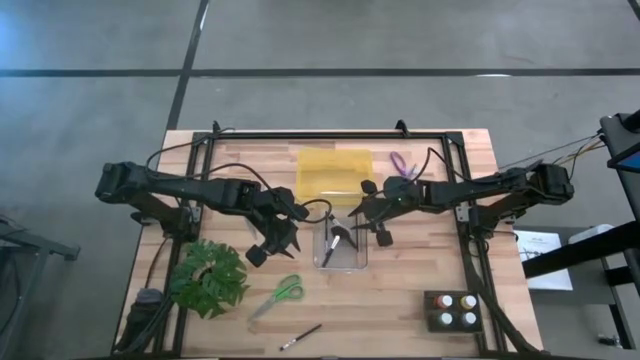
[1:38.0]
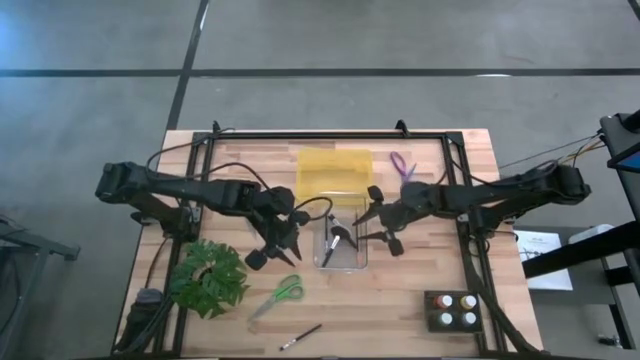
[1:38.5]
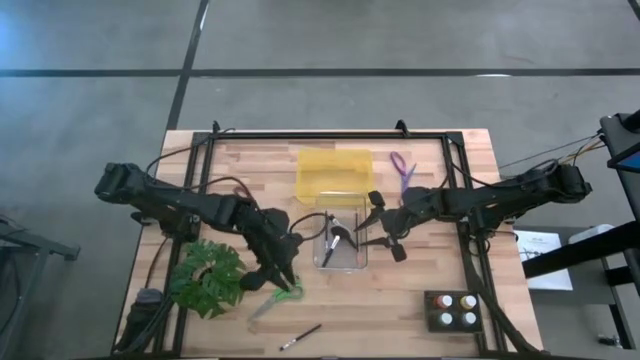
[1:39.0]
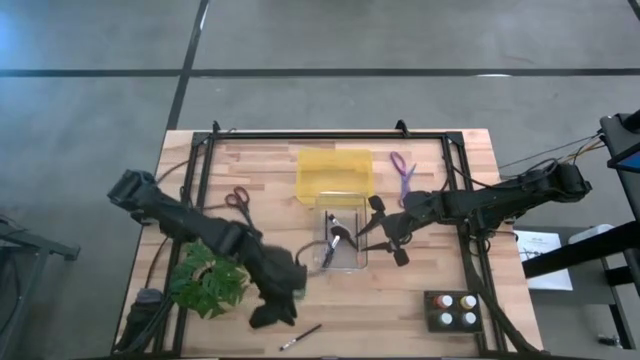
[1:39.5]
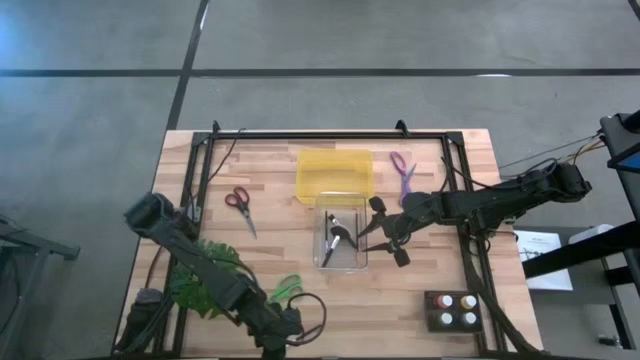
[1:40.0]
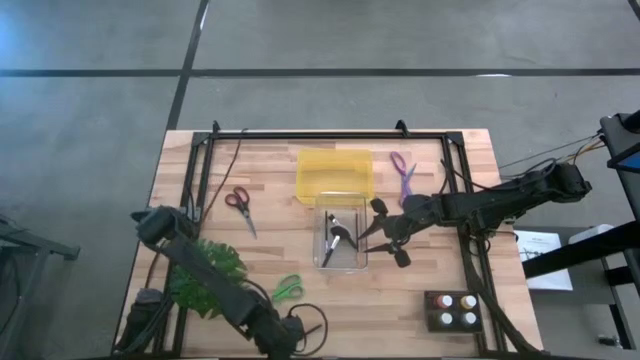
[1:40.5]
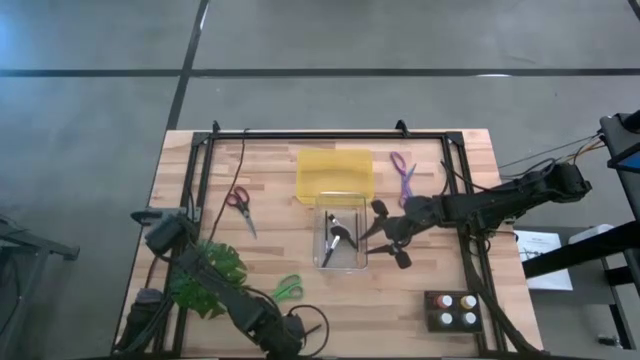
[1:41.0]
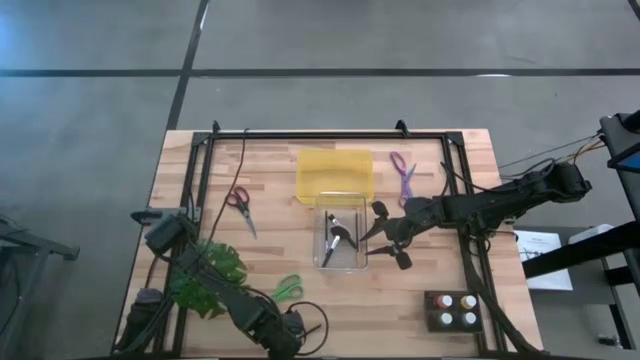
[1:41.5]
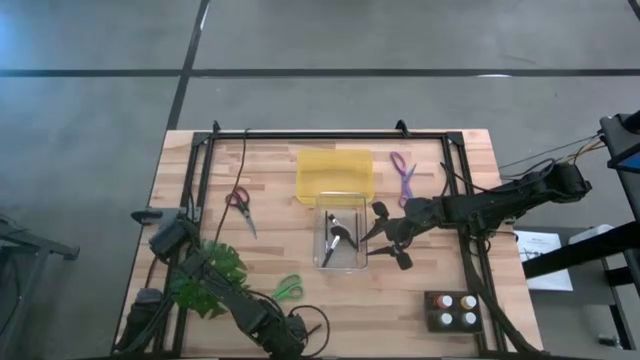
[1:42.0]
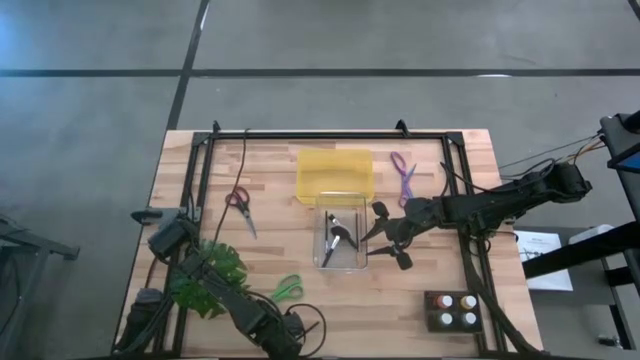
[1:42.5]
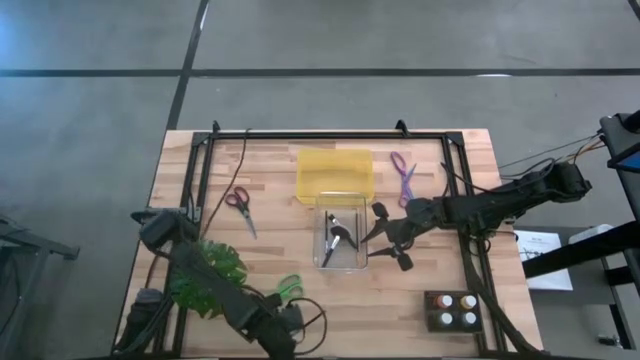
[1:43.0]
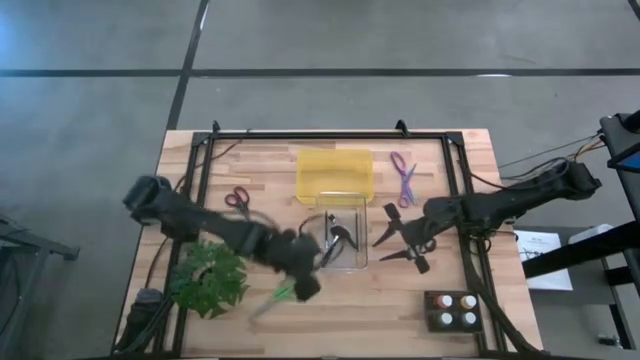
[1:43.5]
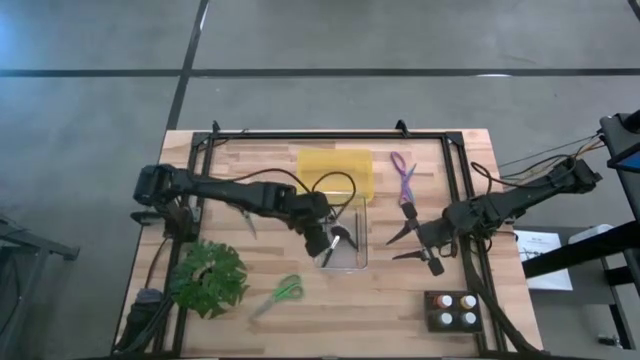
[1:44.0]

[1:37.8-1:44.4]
Task: Pick & Place Paint Supplies
Put the silver eyeshadow brush into the transparent bin

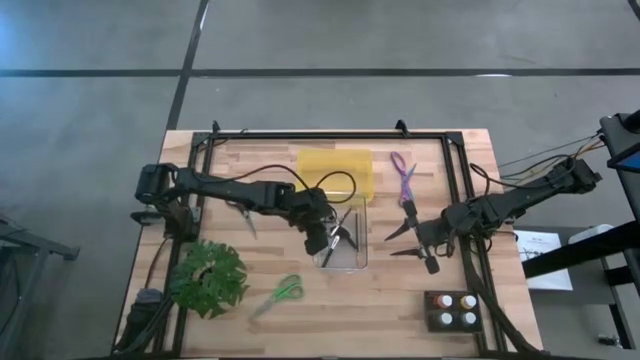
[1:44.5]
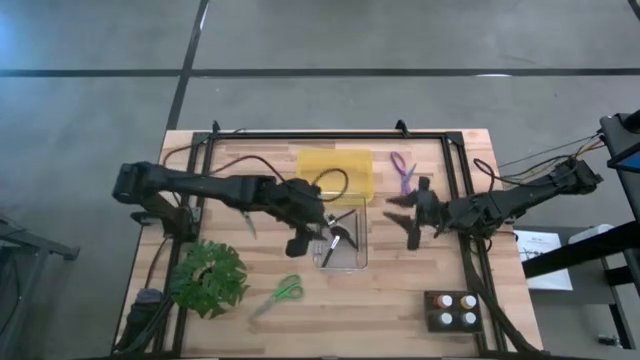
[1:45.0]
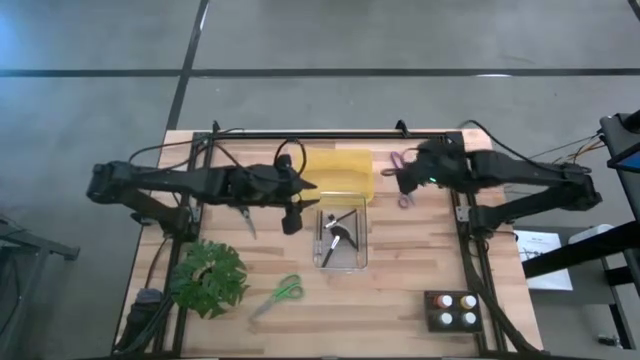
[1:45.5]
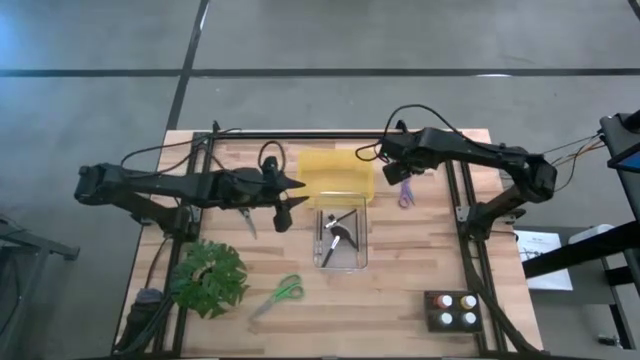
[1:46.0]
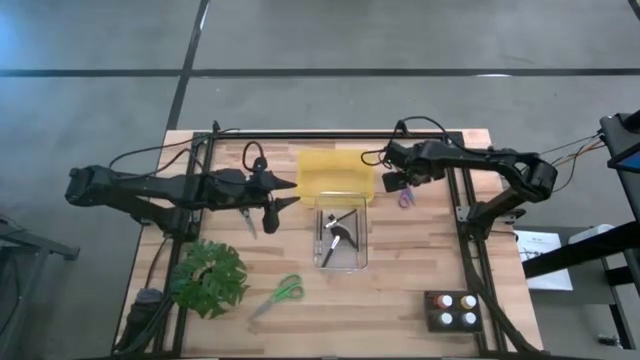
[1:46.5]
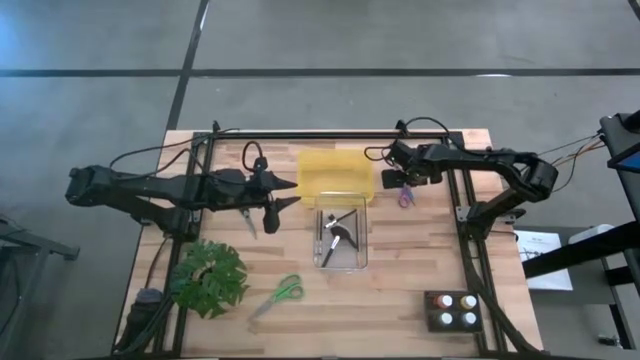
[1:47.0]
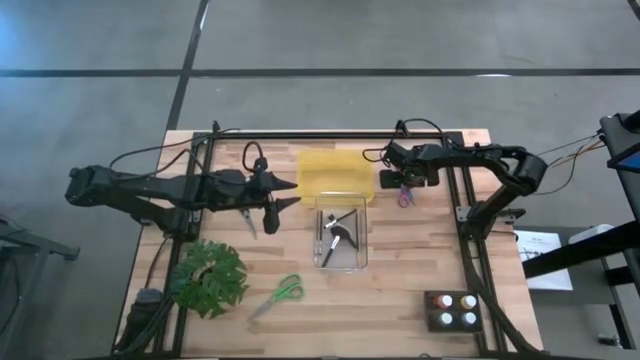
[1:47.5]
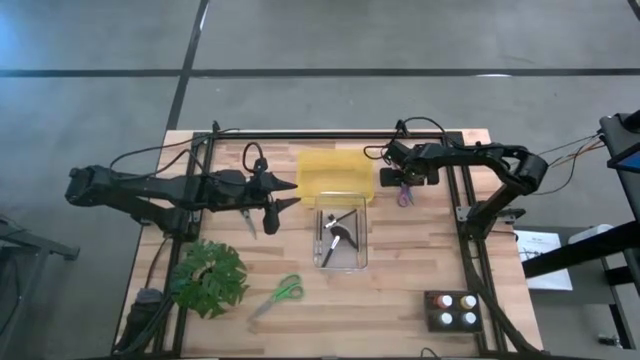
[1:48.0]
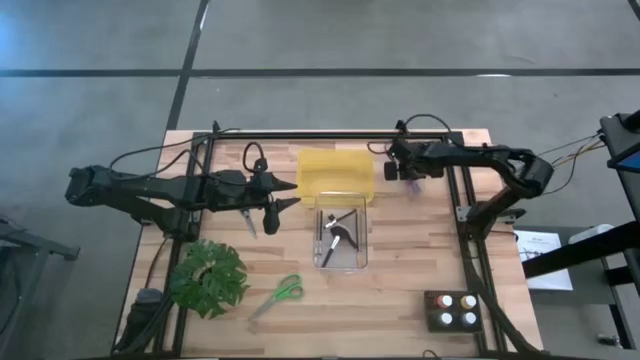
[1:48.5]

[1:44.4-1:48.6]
Put the purple scissors into the yellow bin

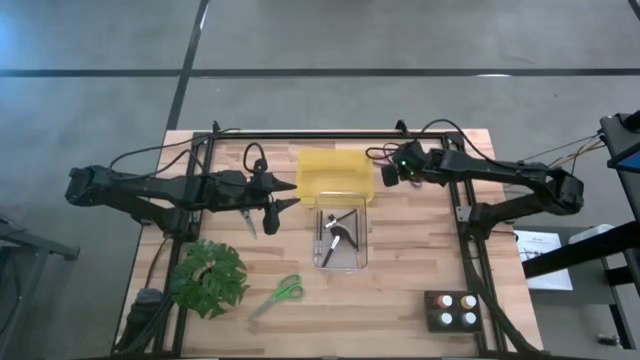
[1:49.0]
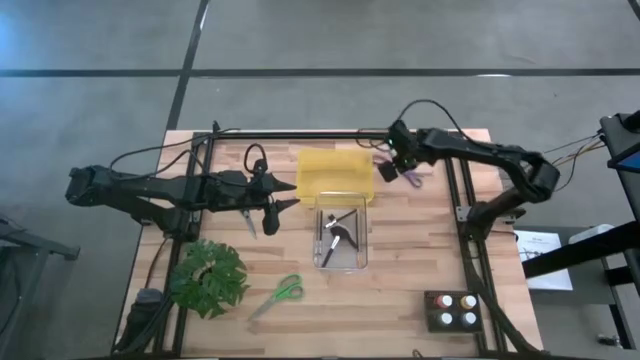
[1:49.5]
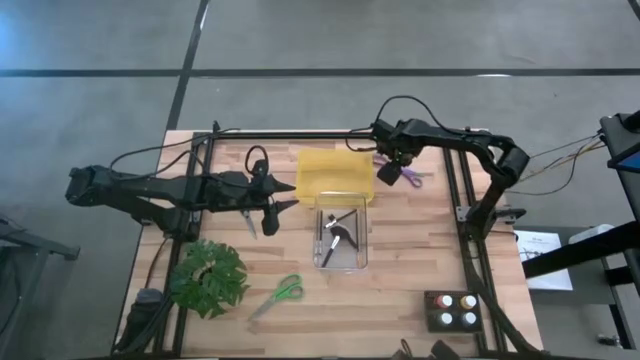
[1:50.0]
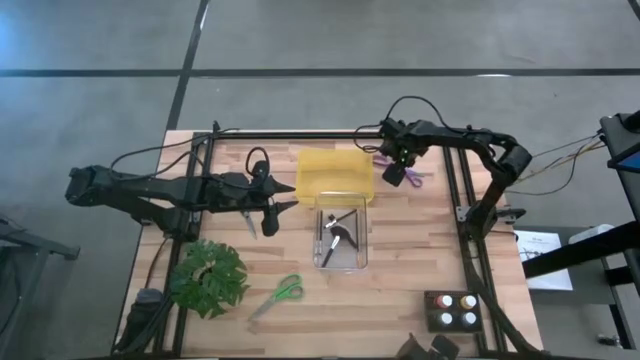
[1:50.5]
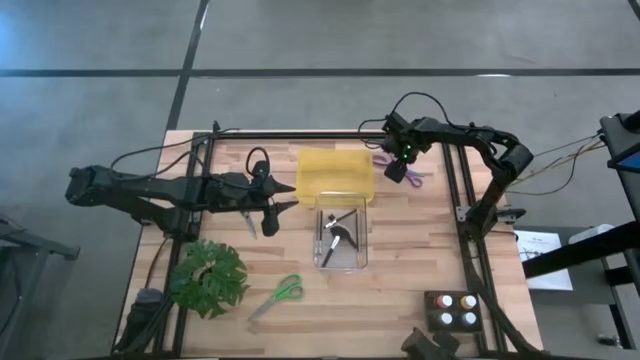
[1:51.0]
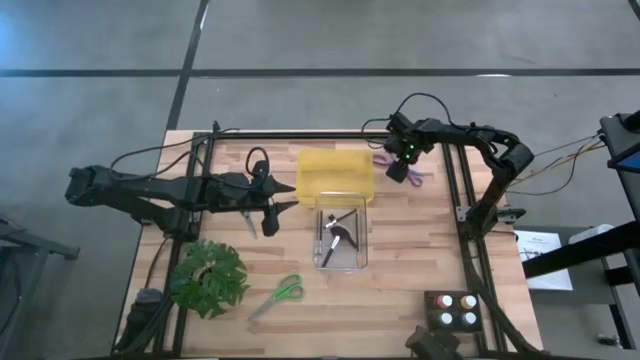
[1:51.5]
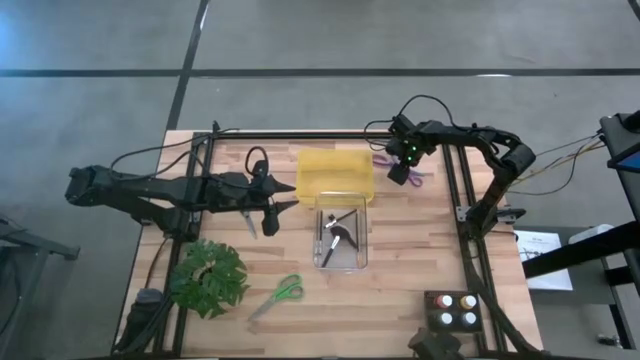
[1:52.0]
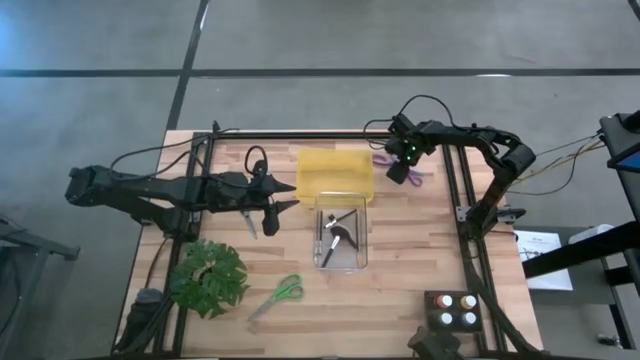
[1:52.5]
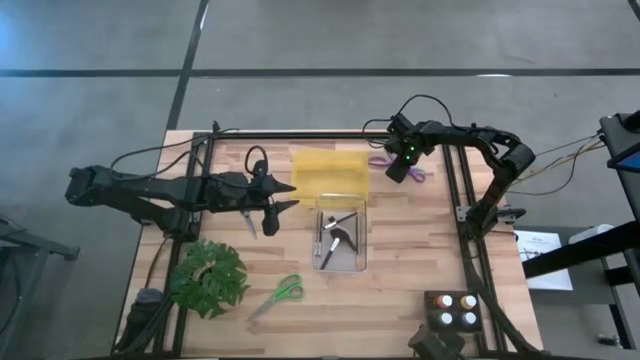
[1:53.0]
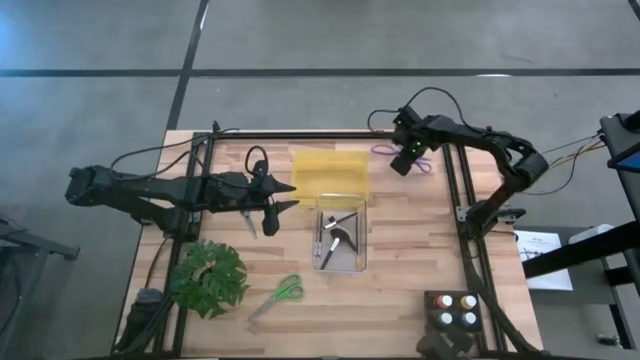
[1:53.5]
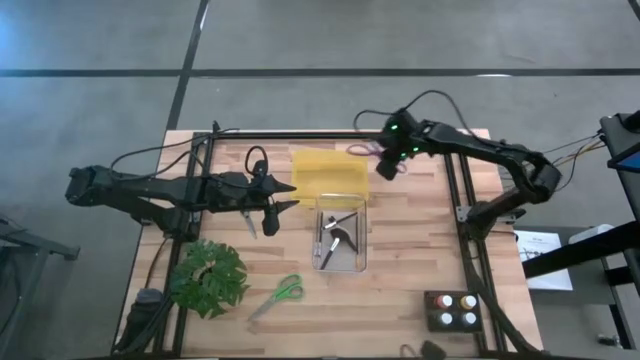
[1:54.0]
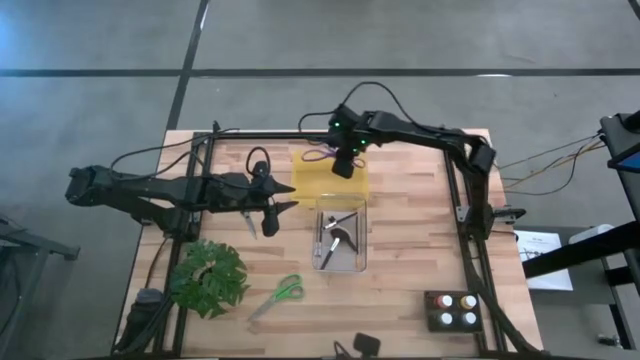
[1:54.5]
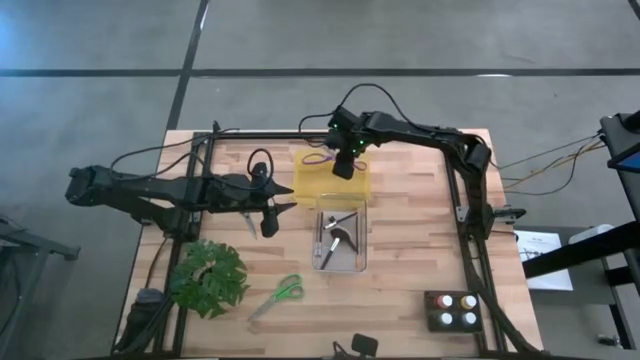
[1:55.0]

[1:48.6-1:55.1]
Put the purple scissors into the yellow bin

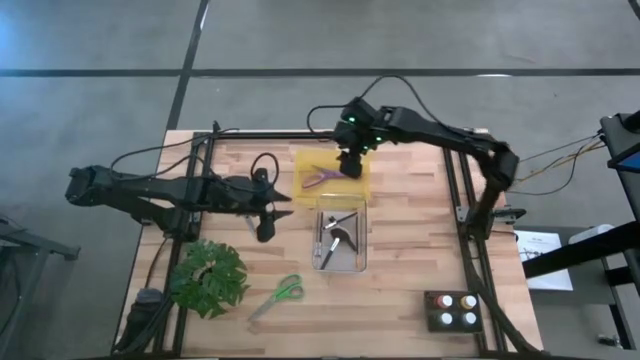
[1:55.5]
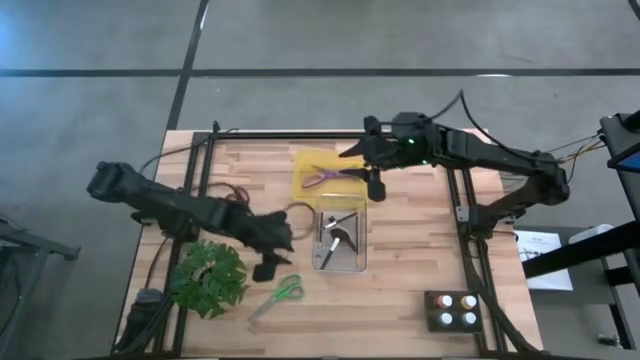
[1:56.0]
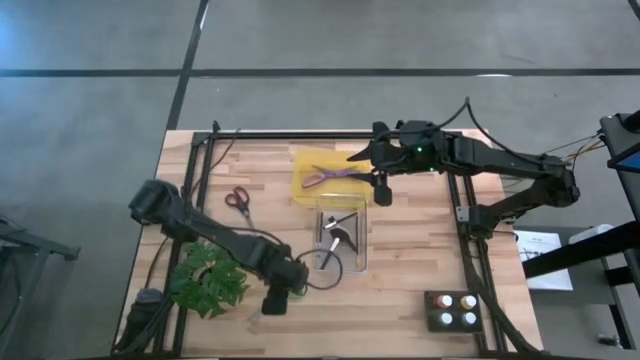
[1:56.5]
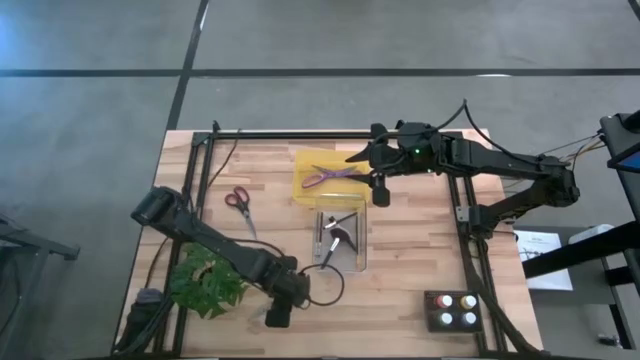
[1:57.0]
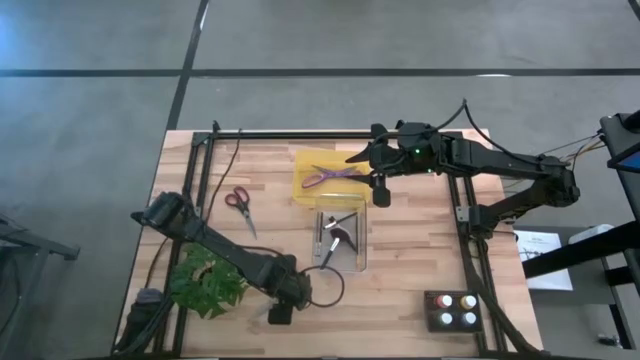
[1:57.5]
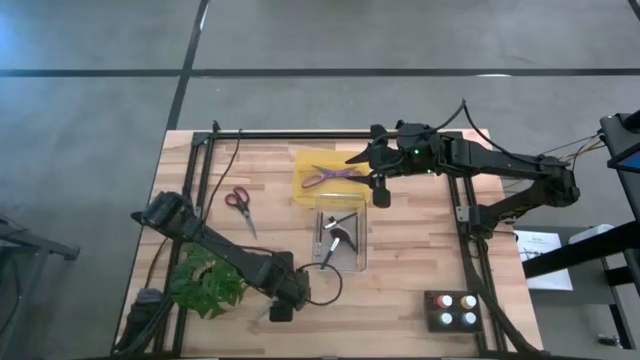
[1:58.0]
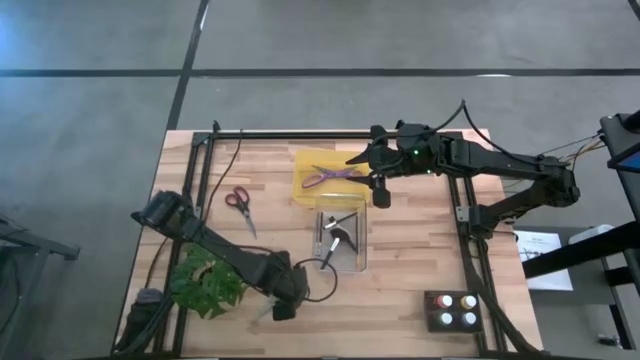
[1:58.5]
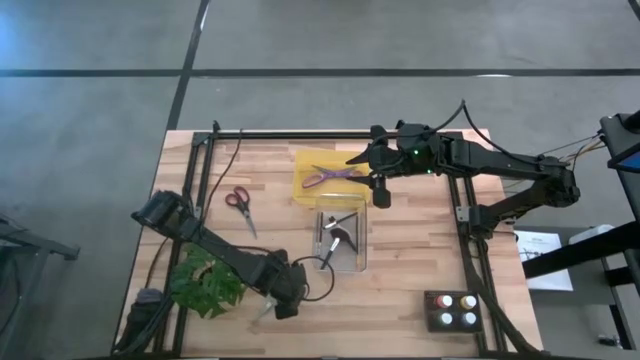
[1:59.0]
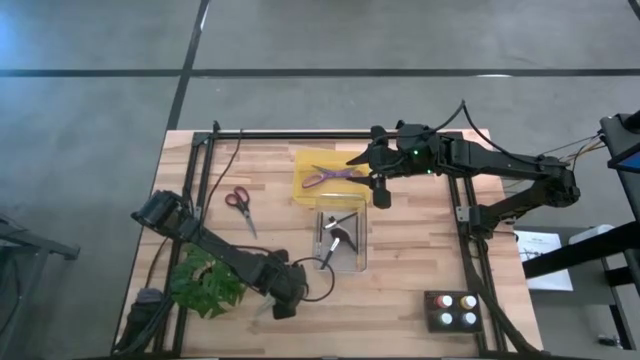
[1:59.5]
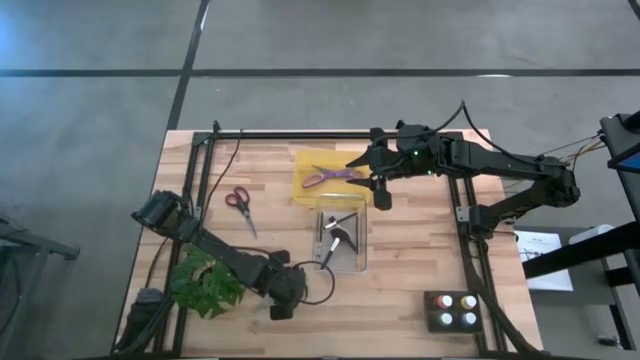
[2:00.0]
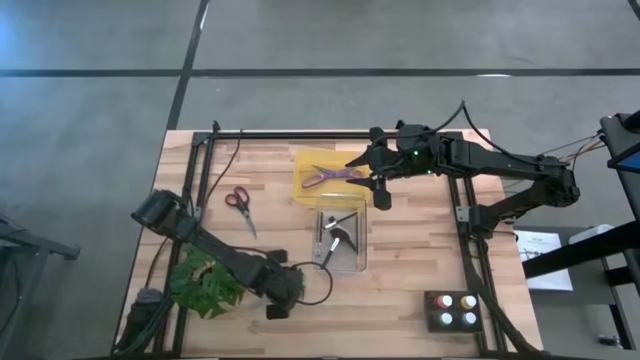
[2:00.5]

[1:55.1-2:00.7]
Put the green scissors into the yellow bin
